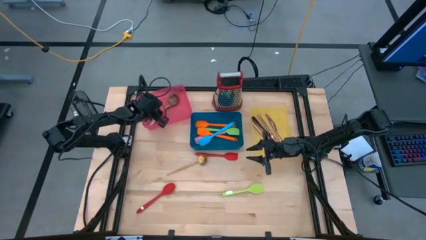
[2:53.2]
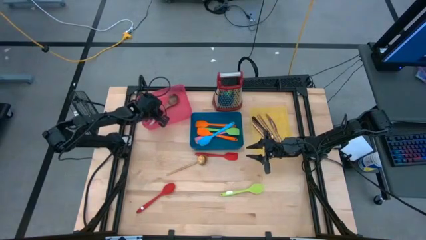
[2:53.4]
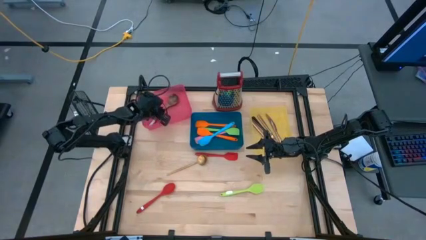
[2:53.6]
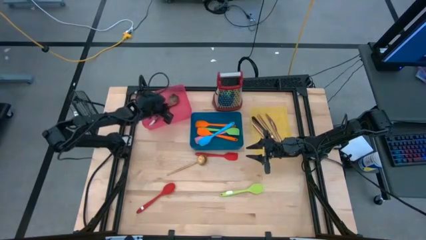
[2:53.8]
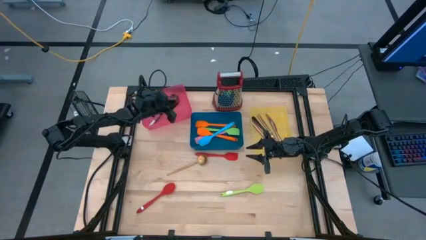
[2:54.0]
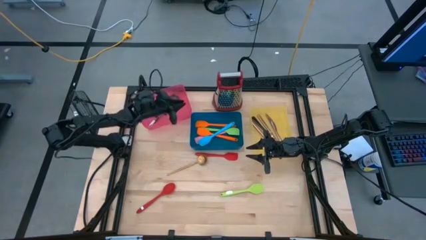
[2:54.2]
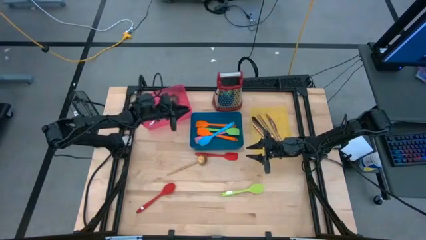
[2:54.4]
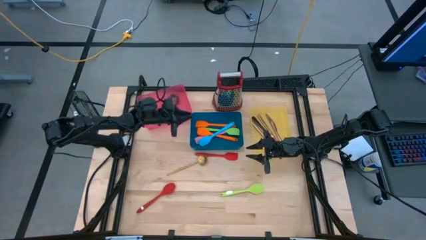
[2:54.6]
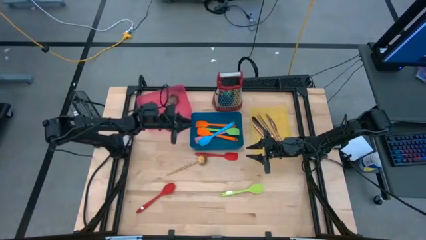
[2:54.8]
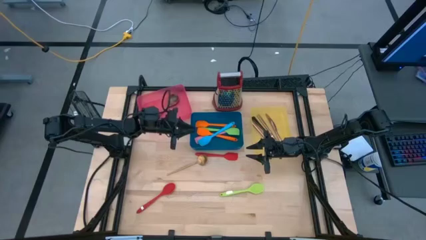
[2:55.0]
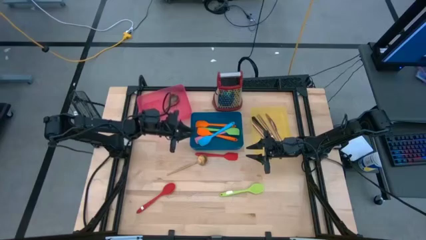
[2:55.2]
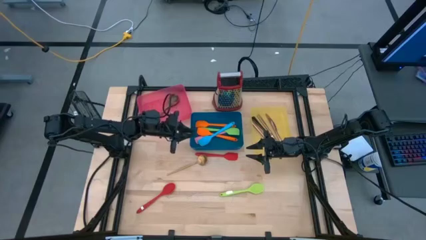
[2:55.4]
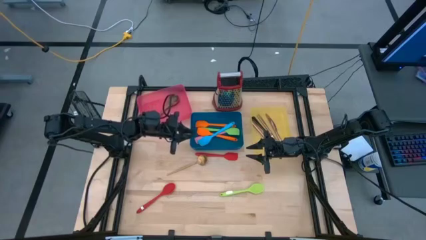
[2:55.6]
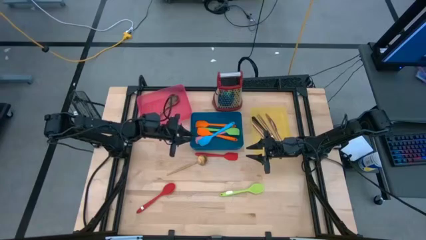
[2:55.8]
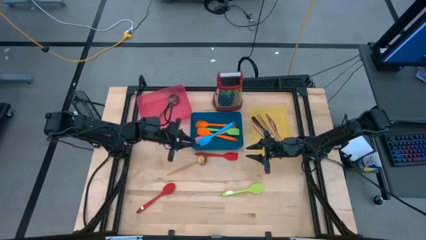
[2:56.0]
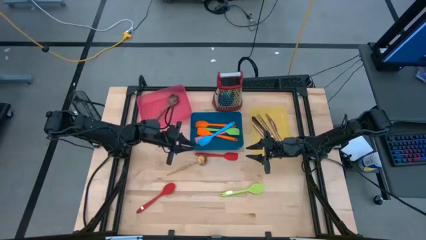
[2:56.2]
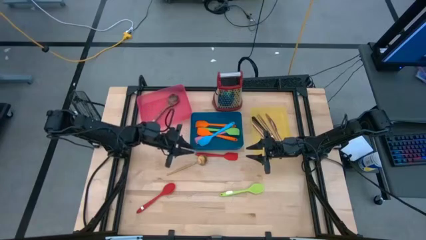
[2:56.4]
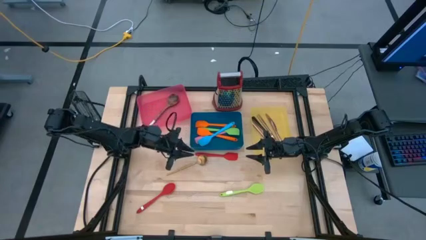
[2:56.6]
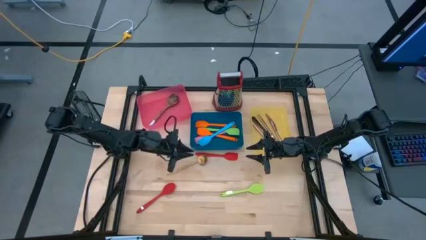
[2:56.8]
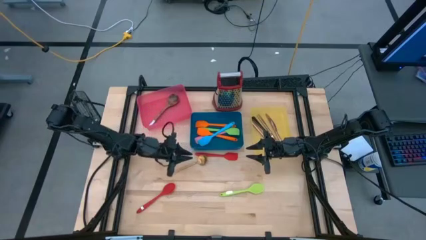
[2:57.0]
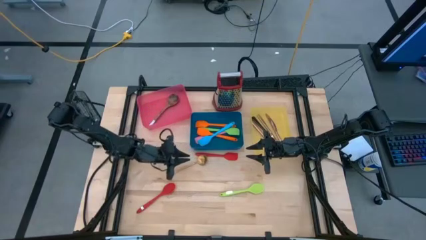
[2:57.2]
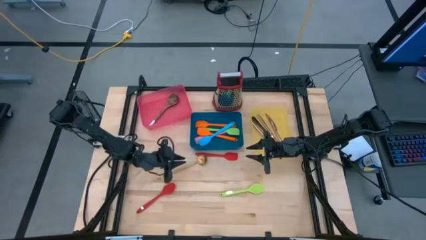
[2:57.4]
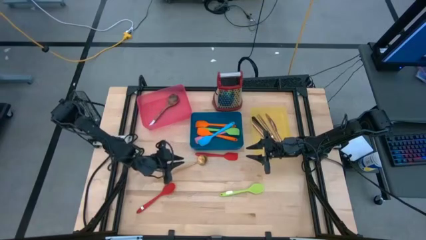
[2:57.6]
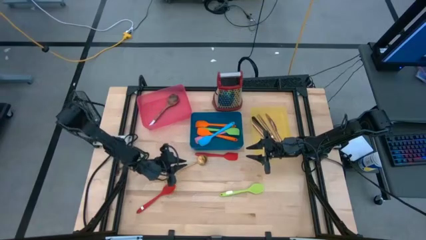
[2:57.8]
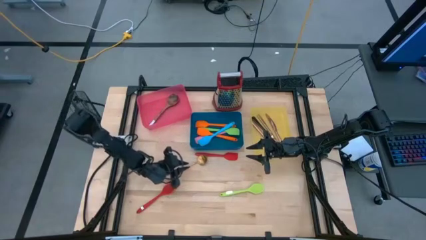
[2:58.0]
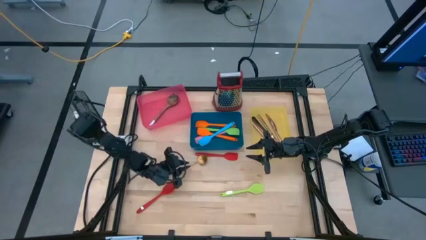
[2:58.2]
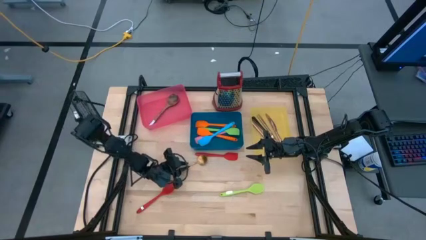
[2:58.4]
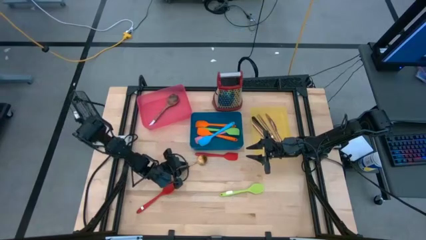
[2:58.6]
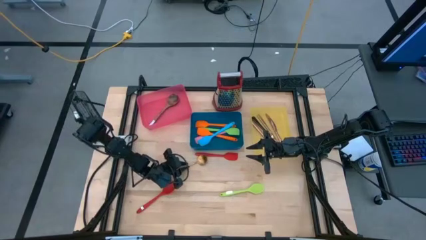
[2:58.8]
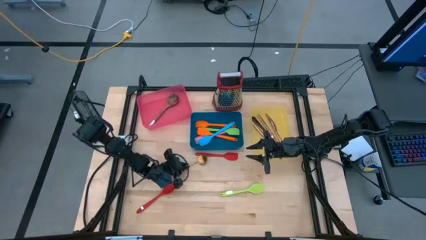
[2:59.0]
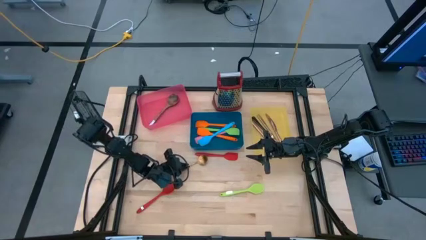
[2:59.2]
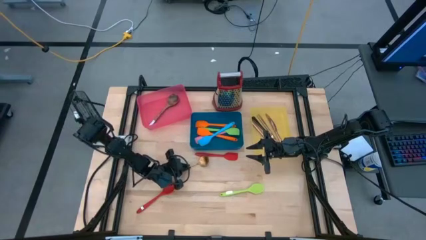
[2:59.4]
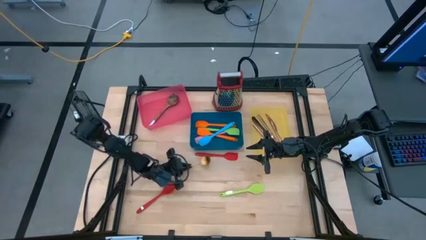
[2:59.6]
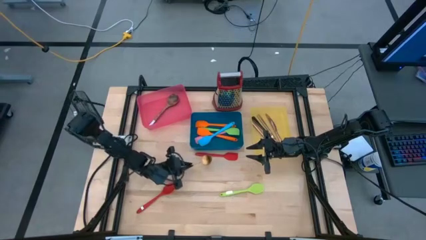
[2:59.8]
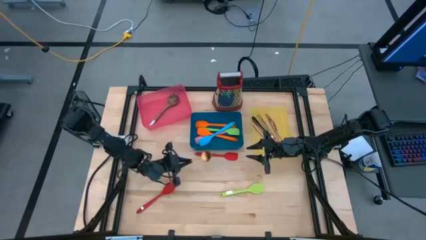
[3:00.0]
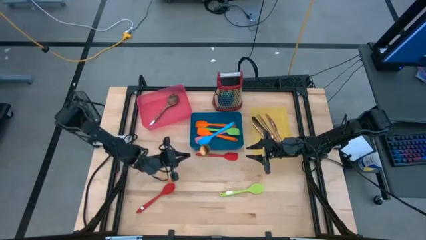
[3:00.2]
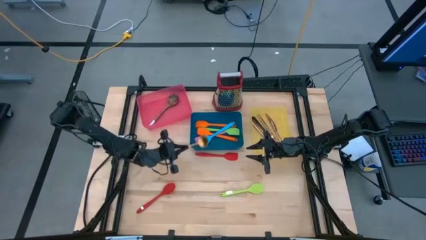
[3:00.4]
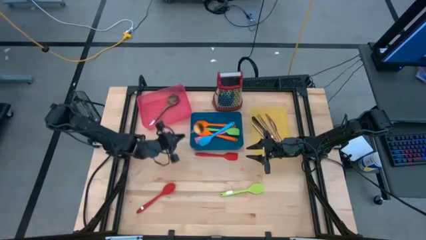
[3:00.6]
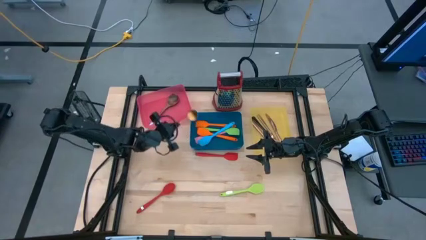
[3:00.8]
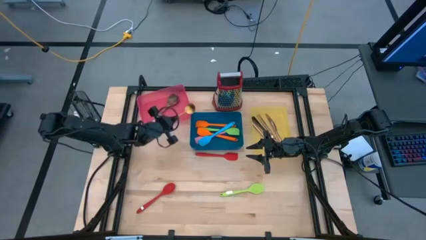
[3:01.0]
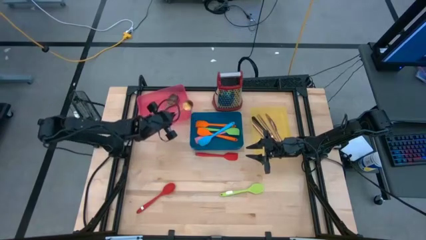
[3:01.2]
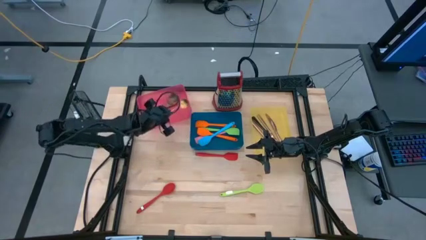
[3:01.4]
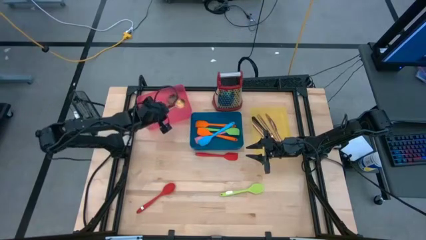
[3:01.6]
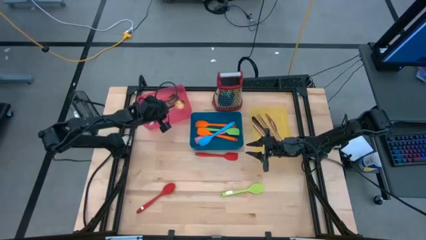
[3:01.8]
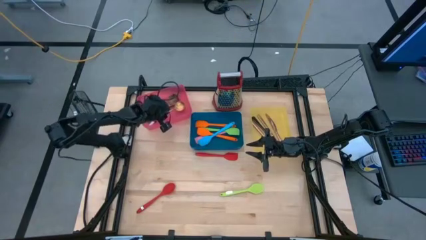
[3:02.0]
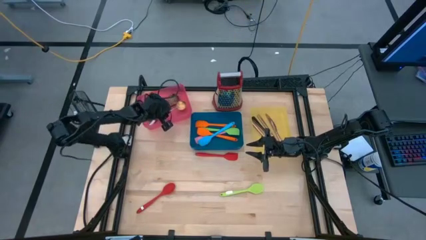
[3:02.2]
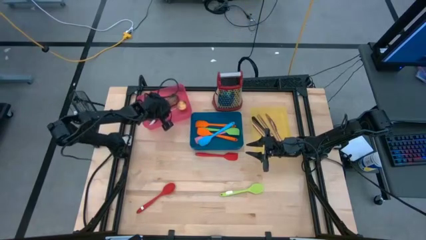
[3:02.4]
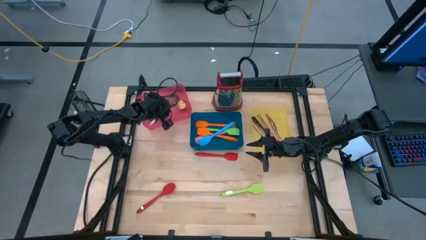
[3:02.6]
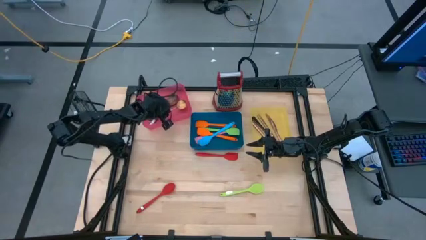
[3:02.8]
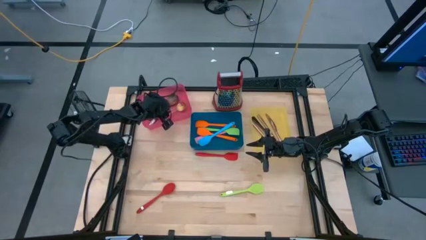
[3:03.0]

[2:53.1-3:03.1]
Task: Pick & Place Kitchen Items
Put the golden serving spoon into the pink bin

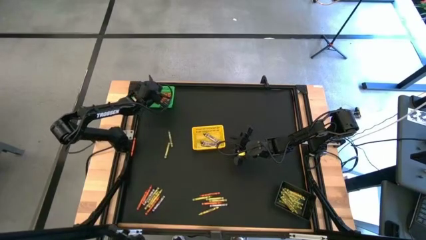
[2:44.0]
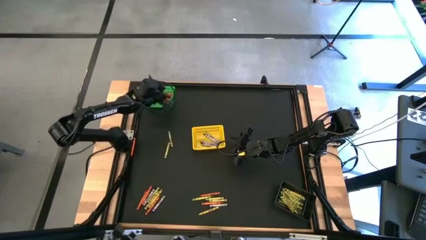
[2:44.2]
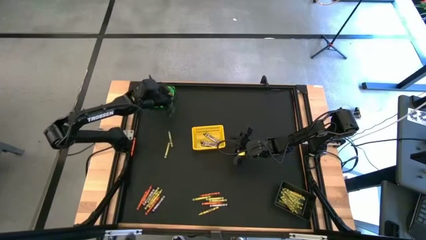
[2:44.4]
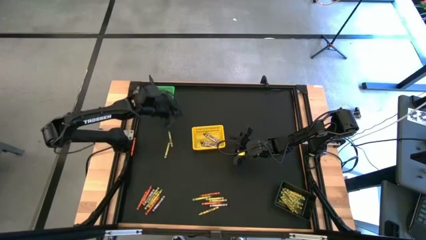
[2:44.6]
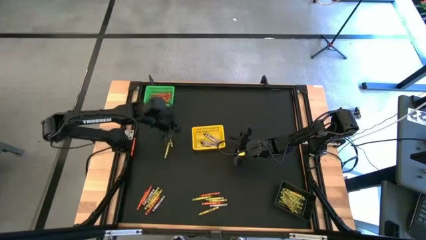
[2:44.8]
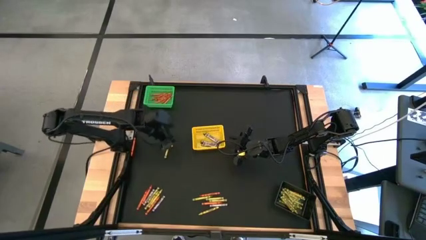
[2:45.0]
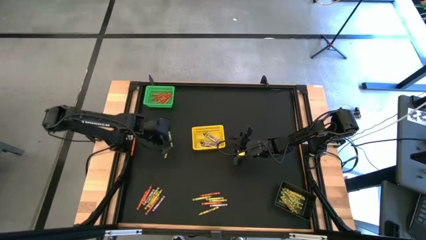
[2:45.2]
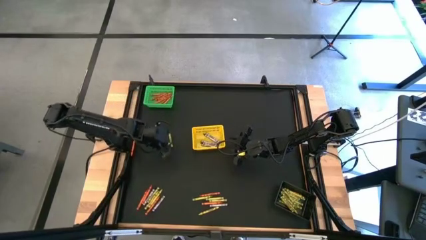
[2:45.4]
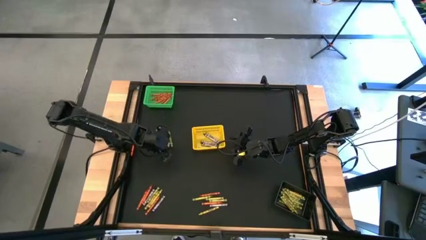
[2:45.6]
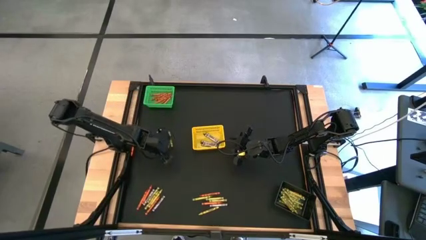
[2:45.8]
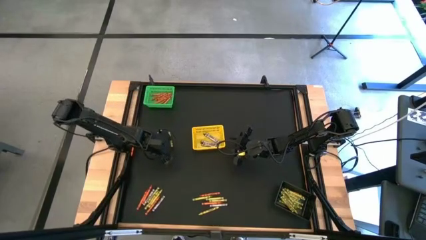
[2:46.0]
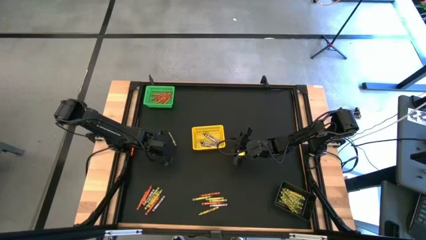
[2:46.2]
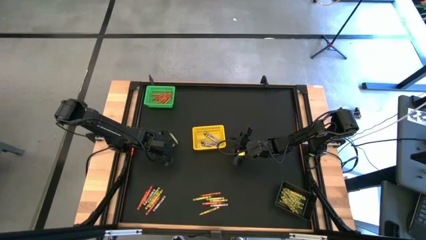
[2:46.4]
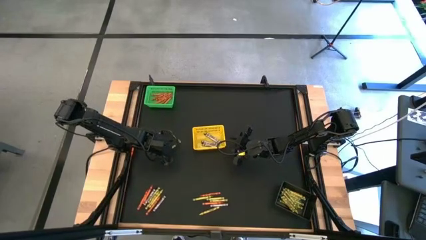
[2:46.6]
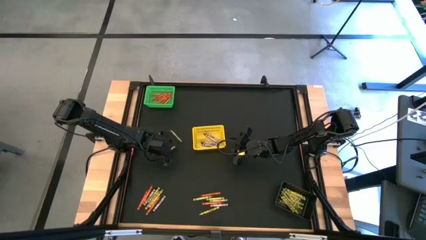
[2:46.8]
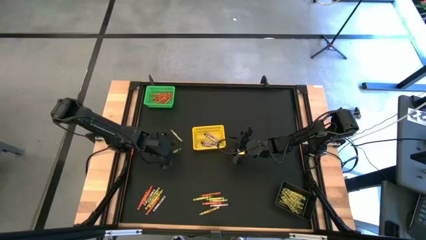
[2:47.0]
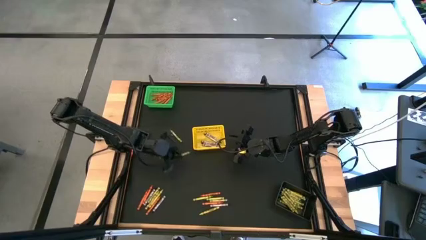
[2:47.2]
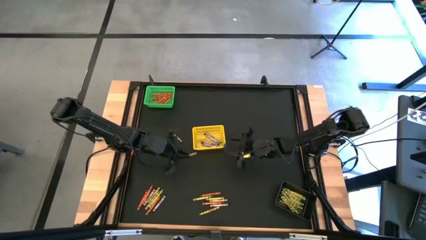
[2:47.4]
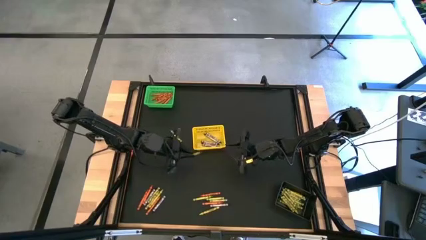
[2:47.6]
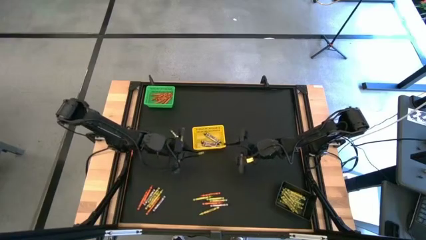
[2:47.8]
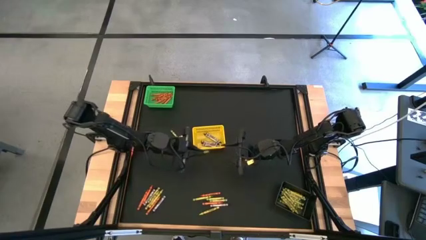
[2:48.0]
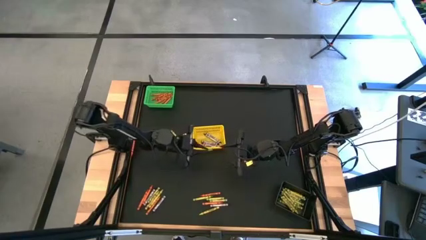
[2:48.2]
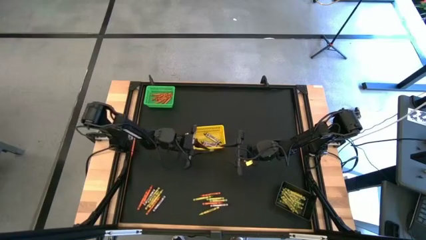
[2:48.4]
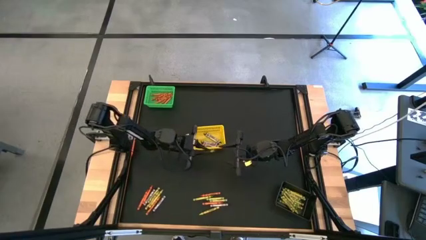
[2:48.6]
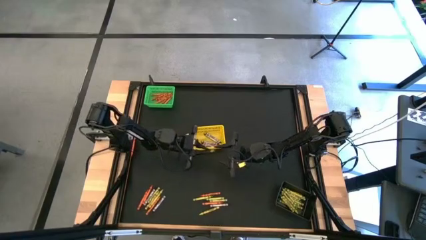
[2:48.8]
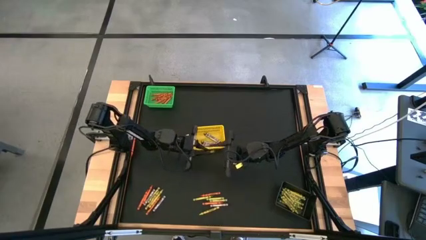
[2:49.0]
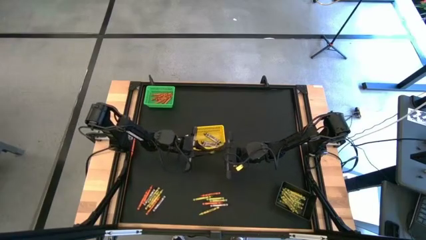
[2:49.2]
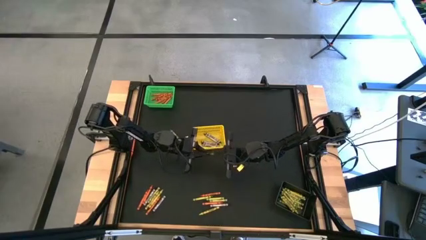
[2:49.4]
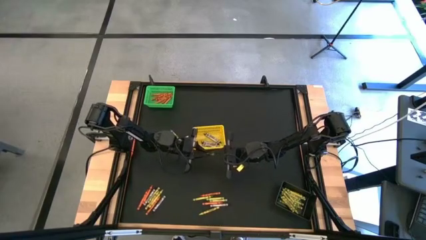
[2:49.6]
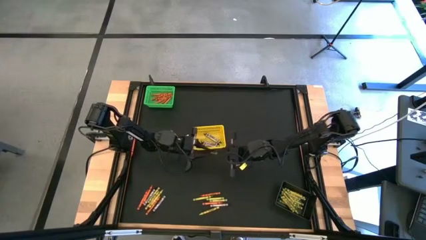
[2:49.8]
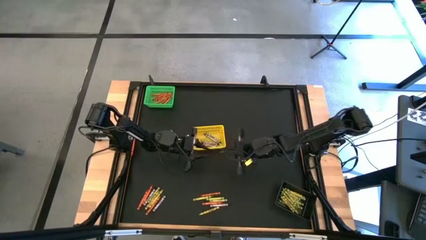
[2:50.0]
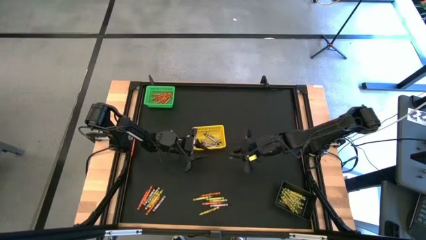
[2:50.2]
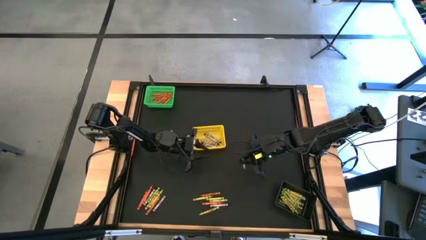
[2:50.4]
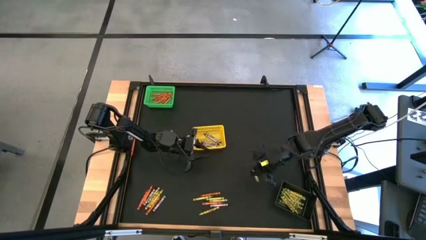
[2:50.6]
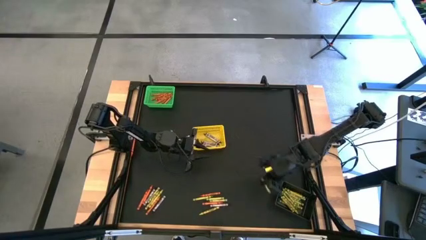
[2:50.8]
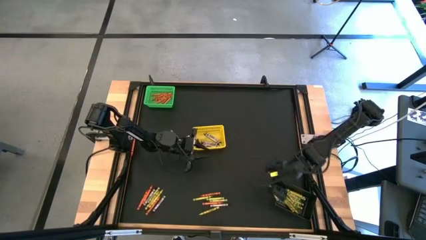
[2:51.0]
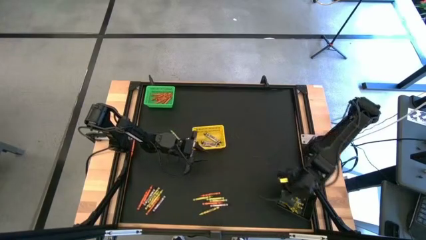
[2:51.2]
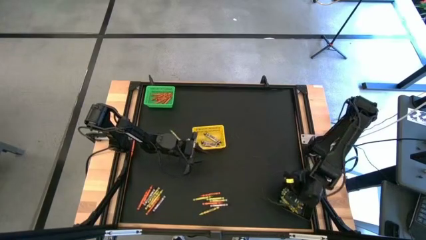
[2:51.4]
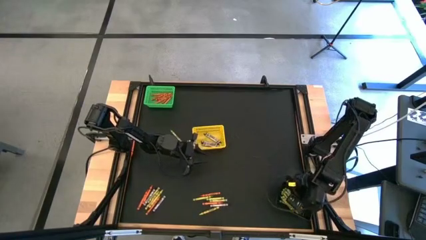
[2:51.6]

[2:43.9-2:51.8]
Task: Sort crayons
Put the green crayon into the black bin
